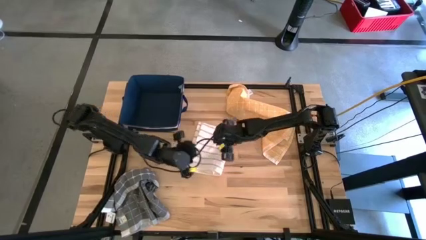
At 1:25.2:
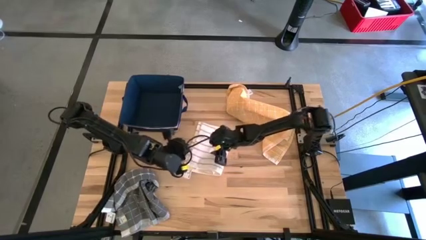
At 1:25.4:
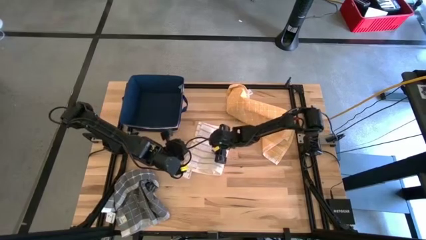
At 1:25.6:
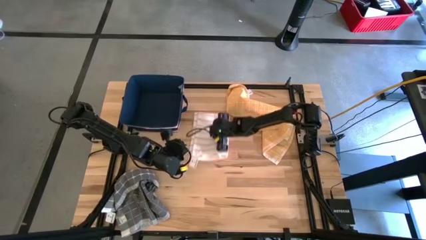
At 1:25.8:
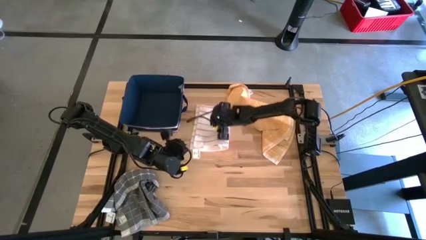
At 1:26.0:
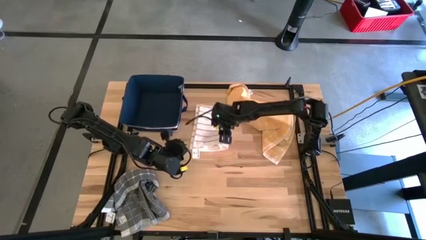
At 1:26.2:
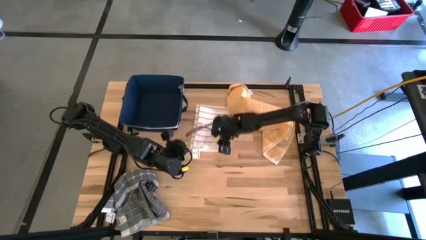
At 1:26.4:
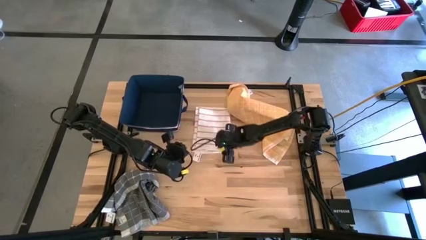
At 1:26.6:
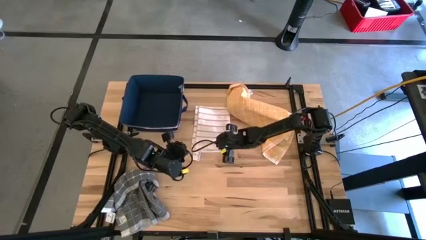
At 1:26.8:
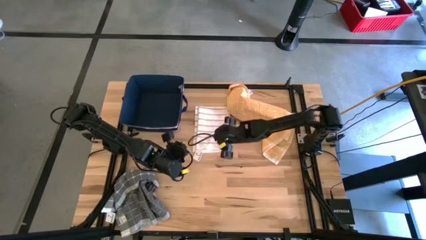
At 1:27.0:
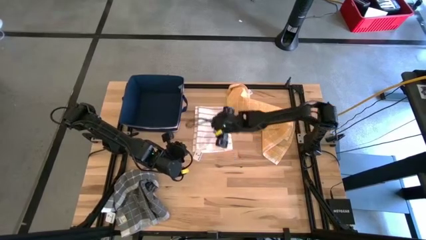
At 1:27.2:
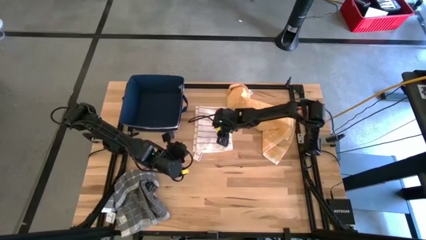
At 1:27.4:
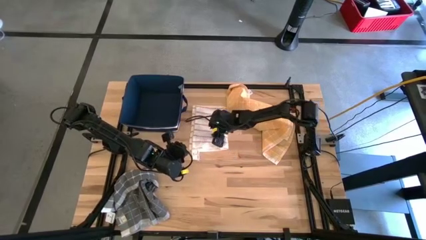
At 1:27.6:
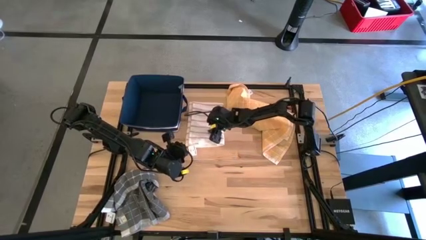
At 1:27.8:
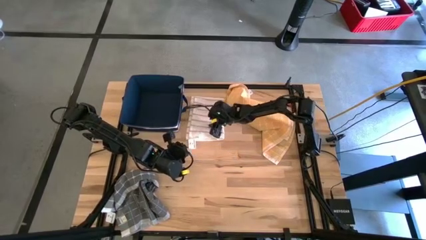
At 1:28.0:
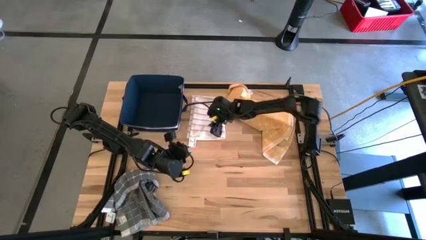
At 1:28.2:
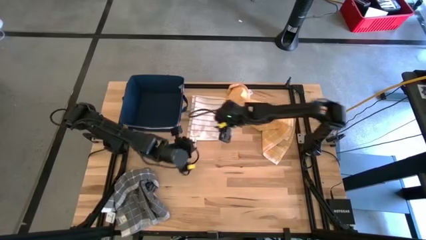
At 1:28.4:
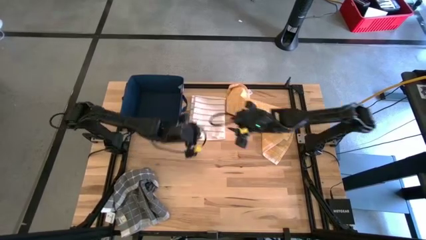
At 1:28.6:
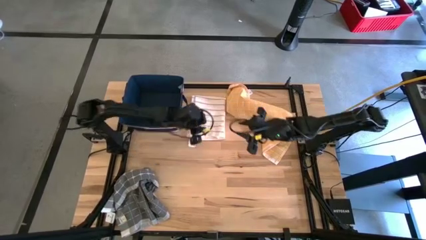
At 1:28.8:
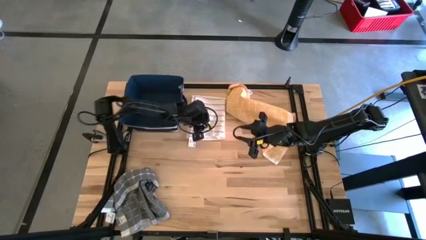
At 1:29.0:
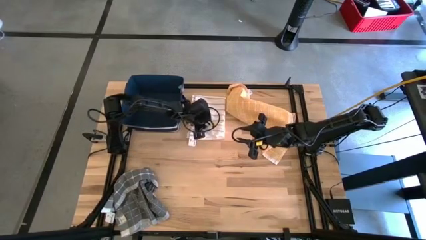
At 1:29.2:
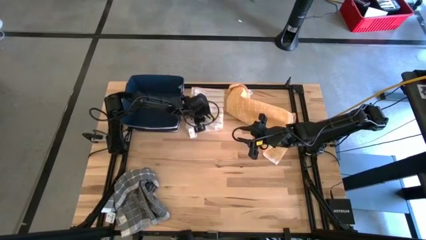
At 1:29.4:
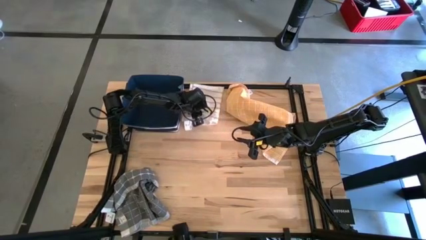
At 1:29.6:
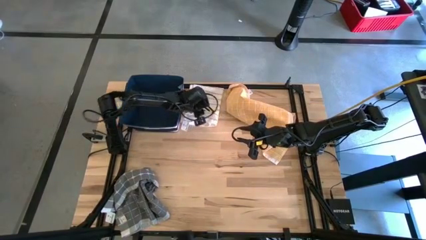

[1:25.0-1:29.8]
Task: Fold towel
Move the white towel to the top of the table

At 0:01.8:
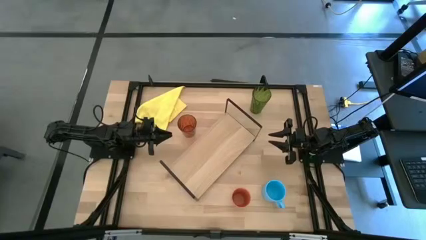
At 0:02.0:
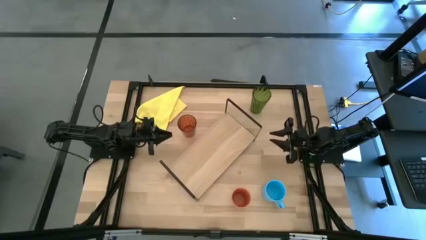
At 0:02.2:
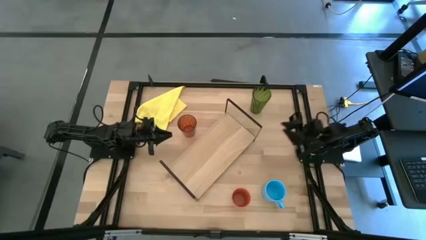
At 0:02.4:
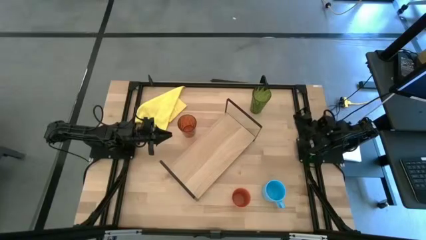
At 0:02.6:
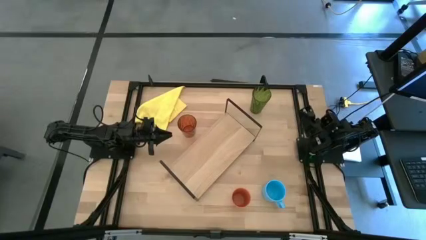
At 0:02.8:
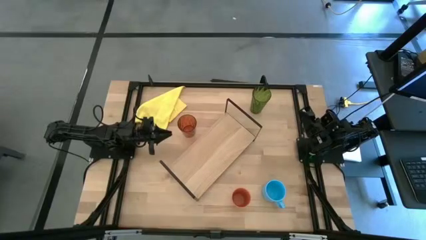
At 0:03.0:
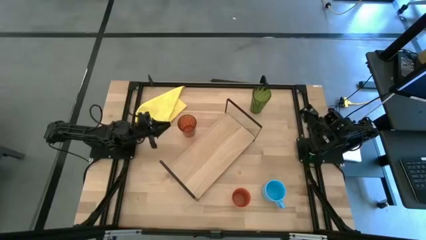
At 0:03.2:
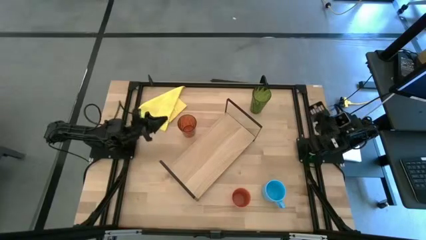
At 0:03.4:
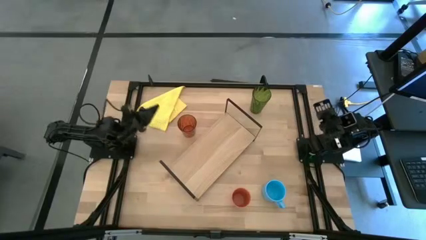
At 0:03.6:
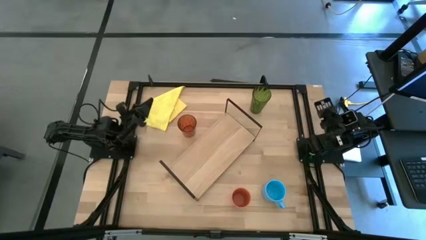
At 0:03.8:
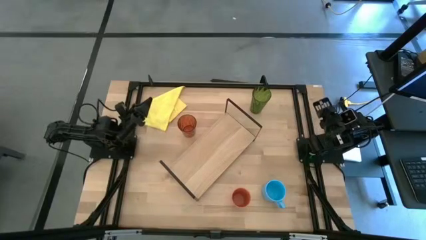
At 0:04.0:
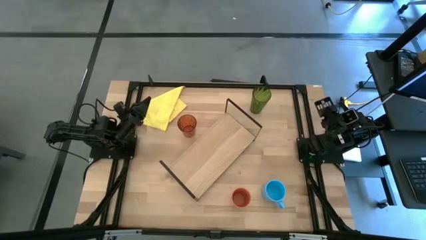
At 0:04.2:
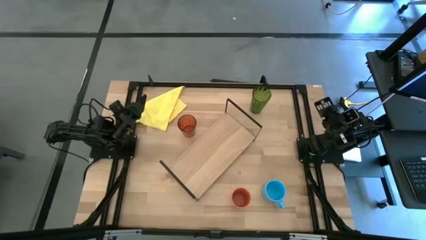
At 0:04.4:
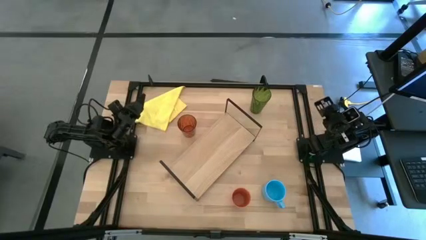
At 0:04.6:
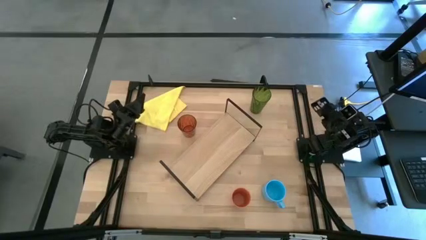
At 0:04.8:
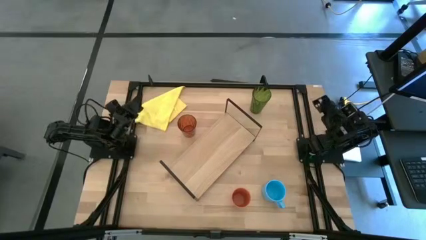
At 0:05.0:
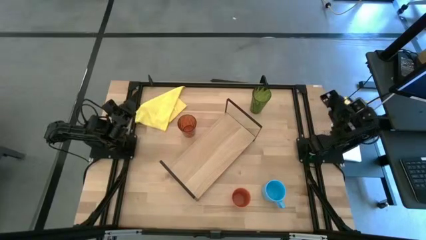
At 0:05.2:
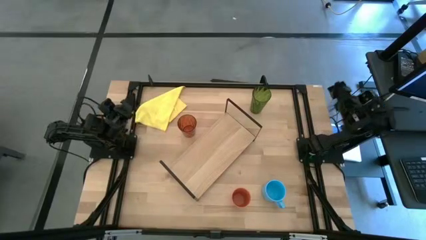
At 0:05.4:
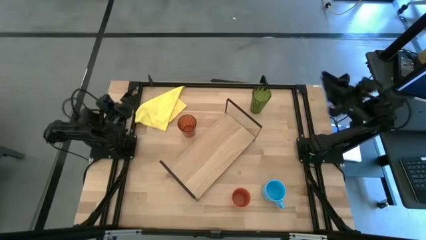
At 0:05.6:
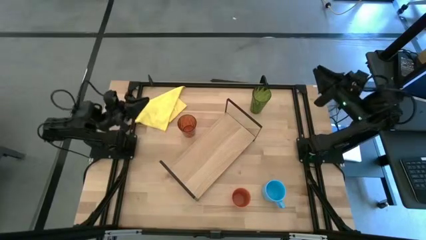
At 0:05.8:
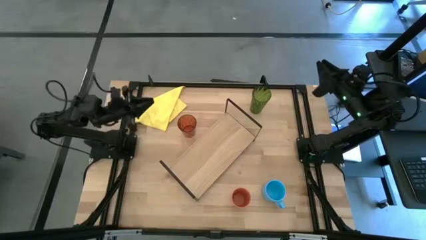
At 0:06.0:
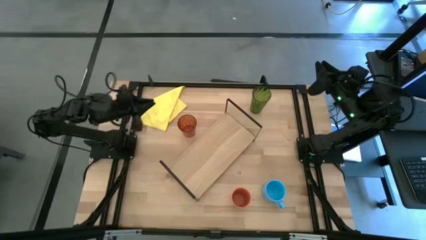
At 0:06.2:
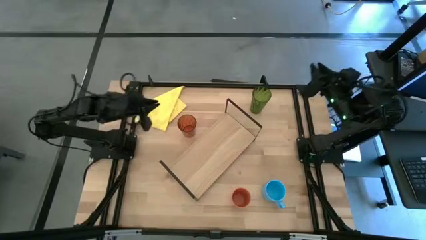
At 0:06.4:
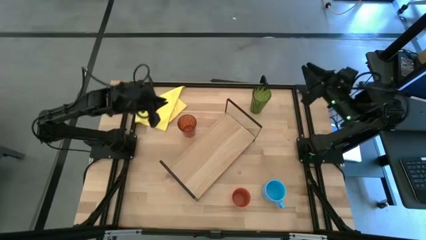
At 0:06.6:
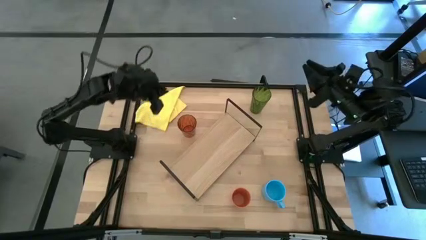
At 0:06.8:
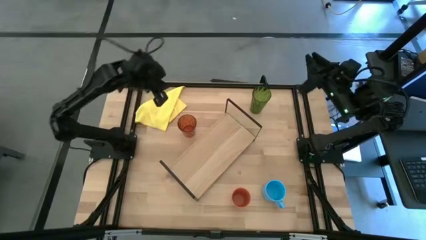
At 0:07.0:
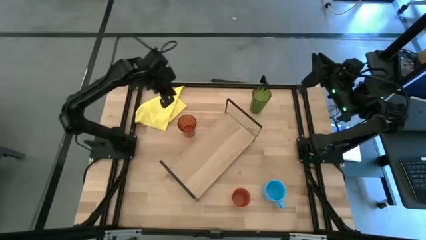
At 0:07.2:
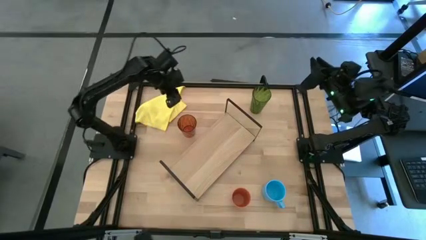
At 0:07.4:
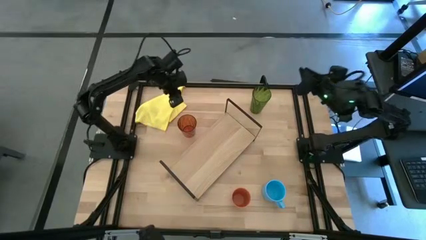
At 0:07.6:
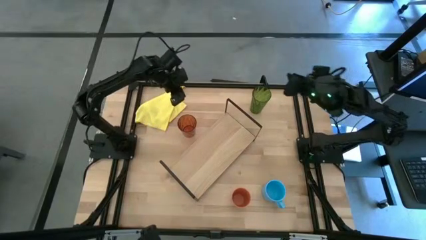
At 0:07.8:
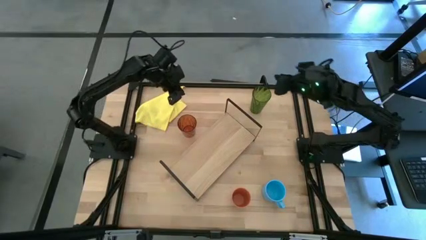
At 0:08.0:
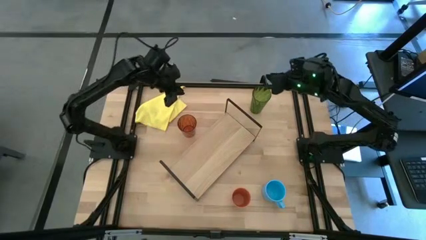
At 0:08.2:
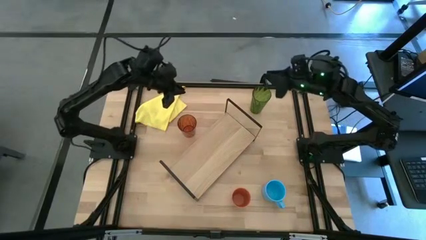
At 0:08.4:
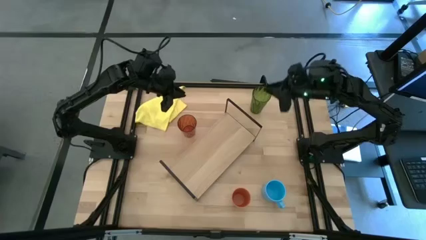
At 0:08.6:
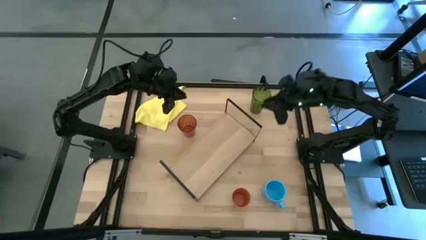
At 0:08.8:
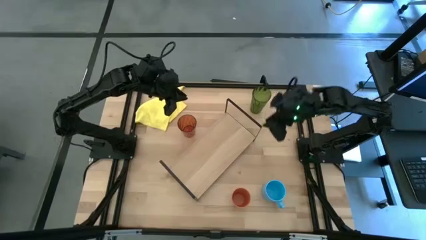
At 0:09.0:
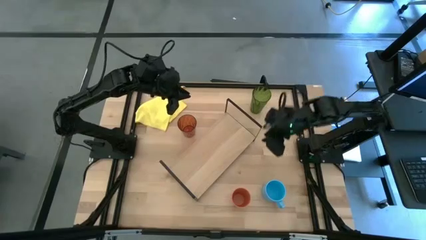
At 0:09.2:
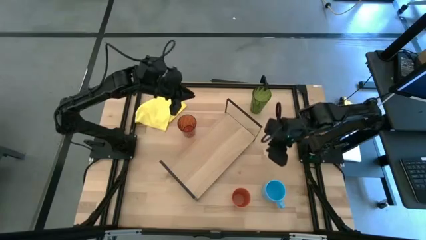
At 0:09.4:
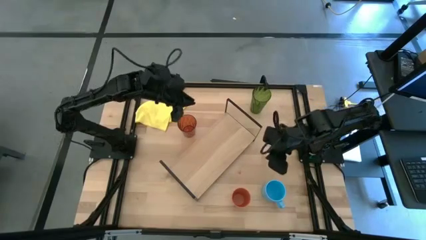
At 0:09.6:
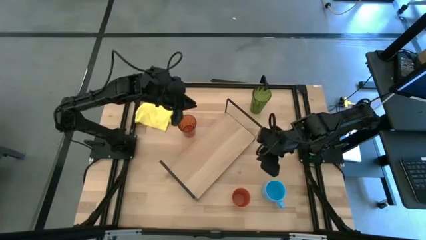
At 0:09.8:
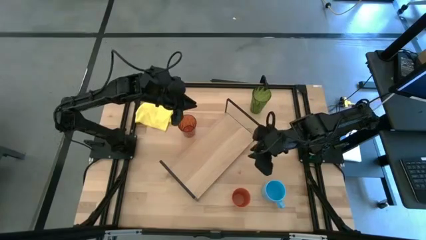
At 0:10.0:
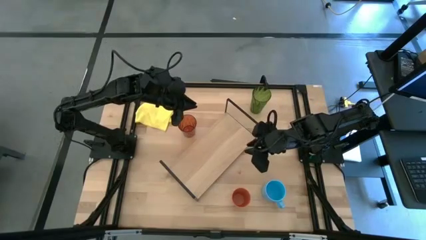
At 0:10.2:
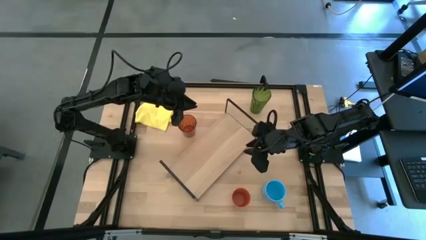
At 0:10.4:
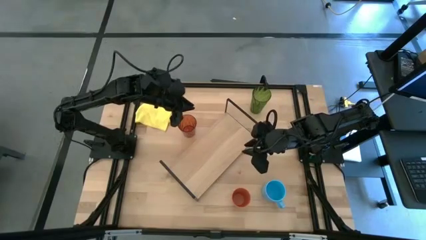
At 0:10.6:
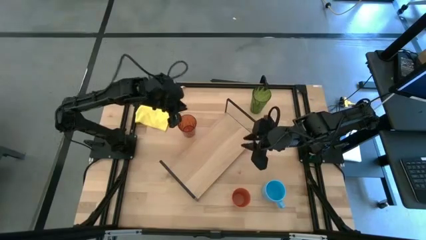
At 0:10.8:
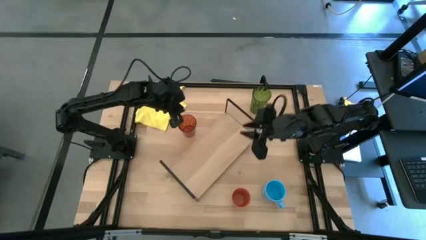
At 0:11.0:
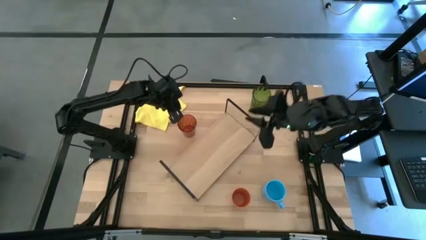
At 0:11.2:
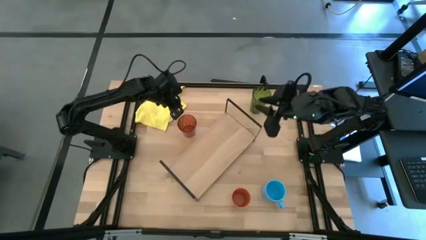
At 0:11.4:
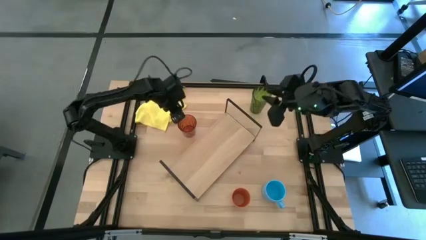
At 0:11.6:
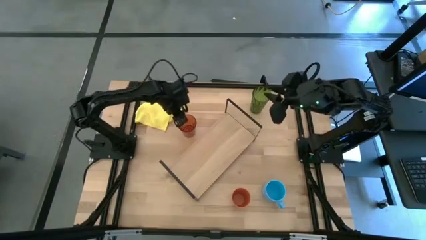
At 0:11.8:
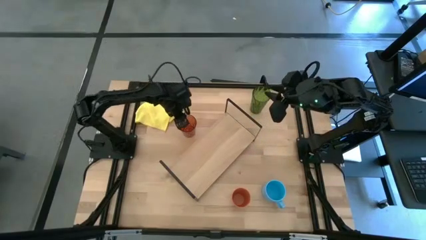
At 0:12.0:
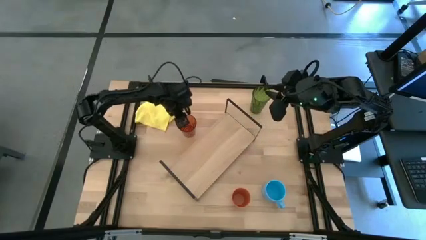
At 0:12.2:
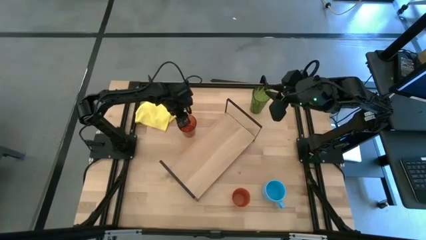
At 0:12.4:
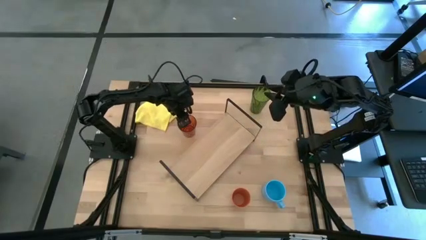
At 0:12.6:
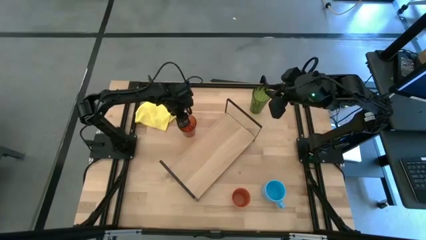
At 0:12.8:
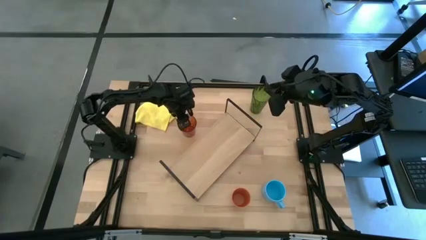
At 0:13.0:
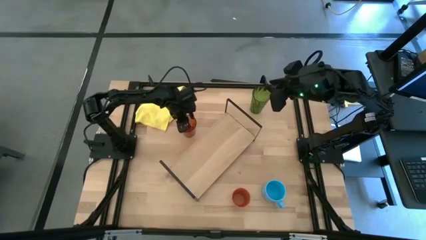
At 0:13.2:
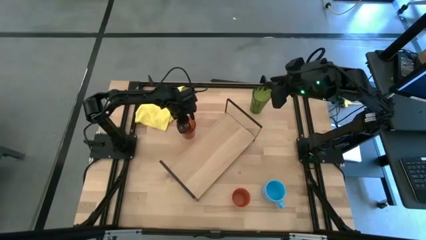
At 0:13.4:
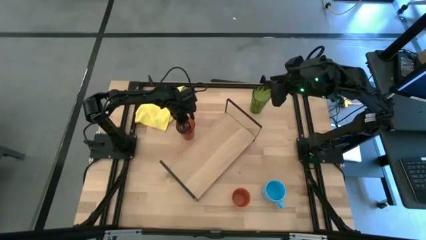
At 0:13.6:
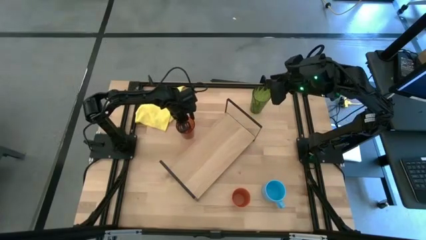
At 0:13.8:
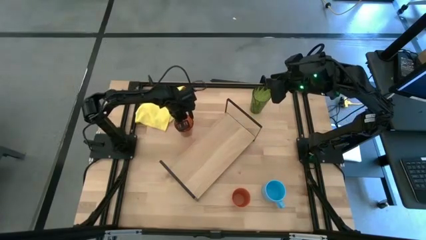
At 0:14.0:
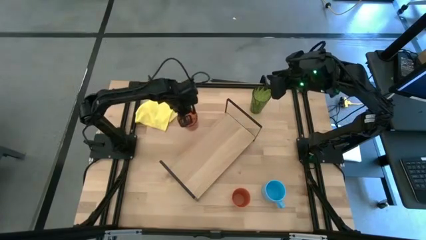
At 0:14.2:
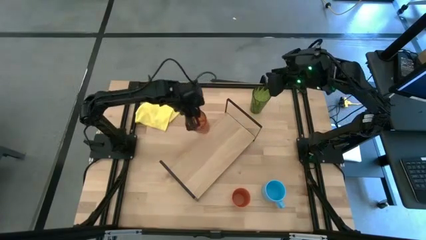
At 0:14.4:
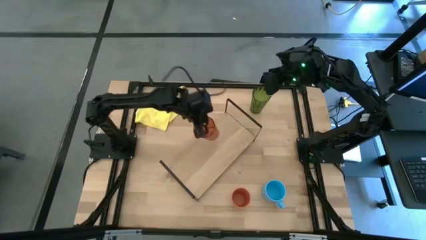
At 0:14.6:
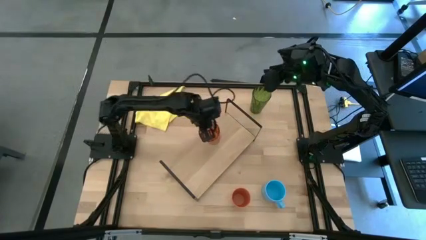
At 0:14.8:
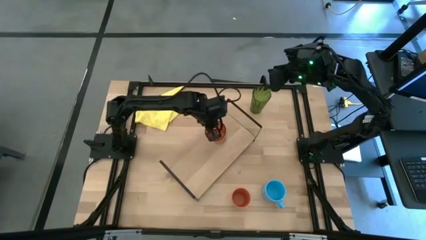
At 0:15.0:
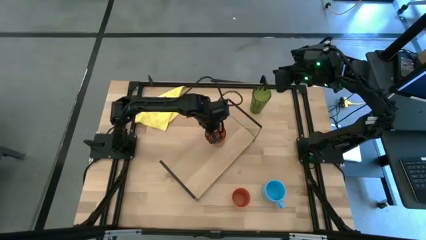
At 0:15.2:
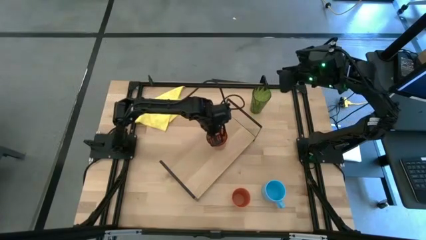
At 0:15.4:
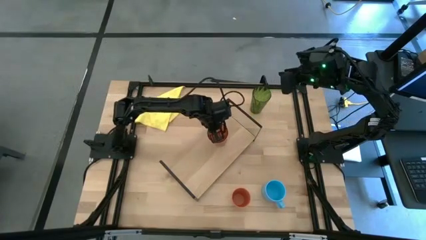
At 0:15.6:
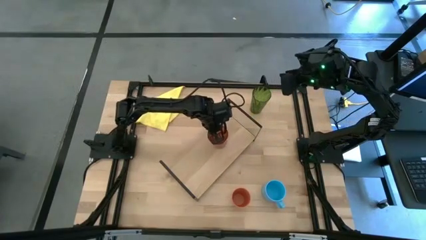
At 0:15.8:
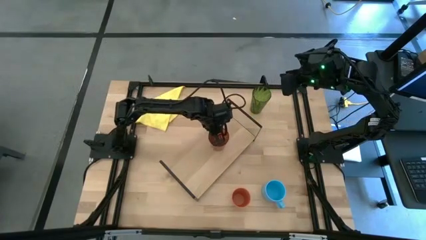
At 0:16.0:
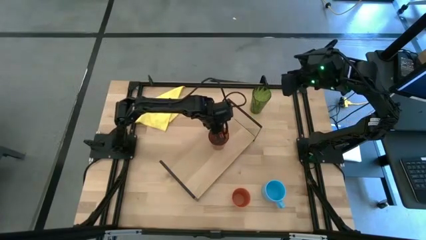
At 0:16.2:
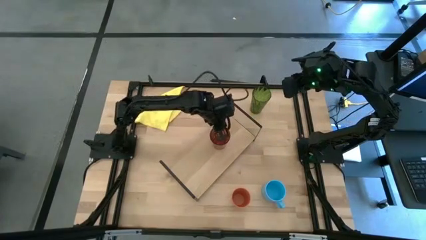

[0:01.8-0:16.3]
Task: Stack small to large cups/mugs on shelf
Put the brown cup on the shelf
